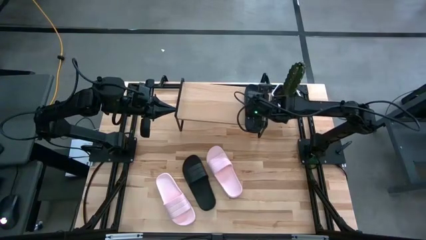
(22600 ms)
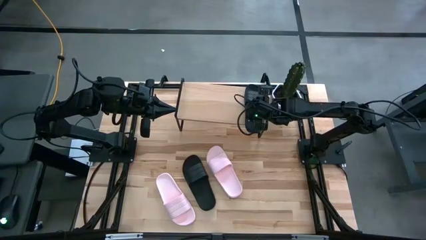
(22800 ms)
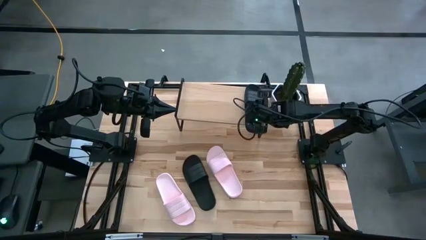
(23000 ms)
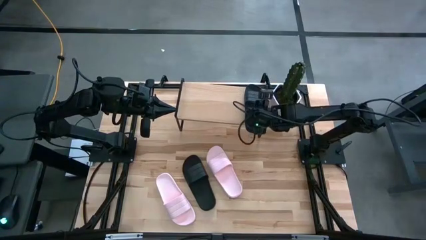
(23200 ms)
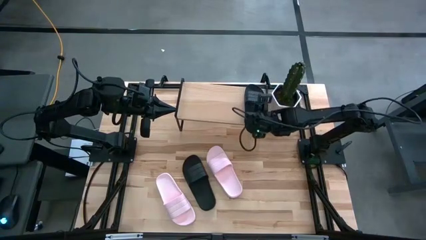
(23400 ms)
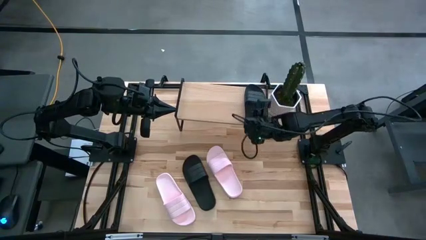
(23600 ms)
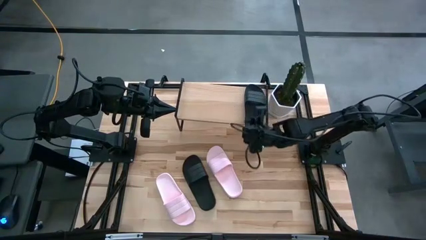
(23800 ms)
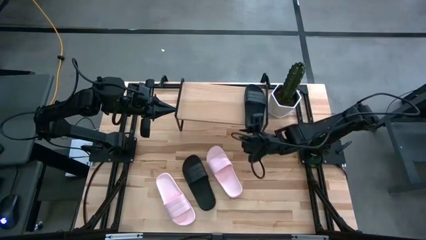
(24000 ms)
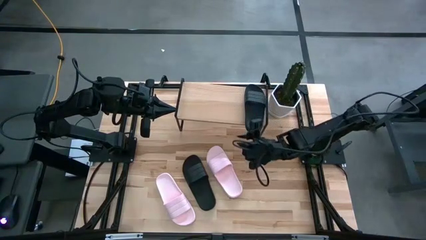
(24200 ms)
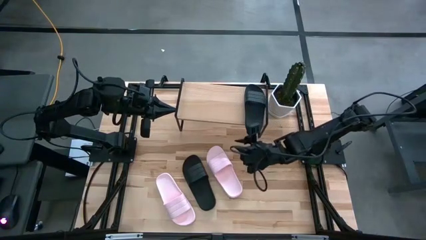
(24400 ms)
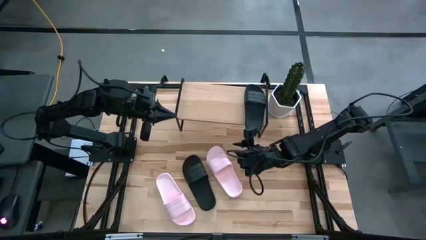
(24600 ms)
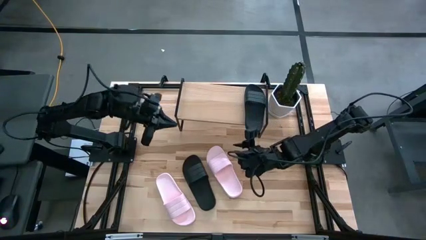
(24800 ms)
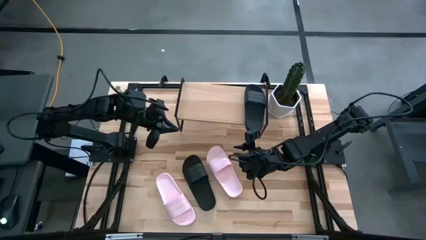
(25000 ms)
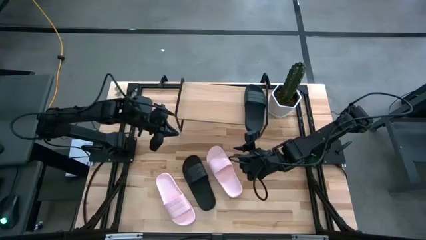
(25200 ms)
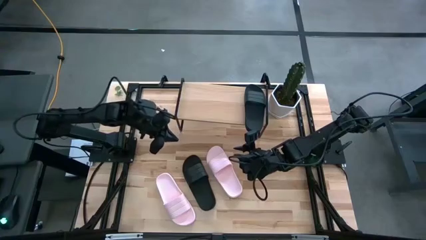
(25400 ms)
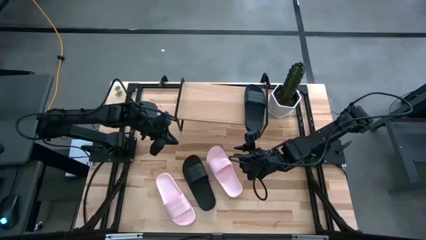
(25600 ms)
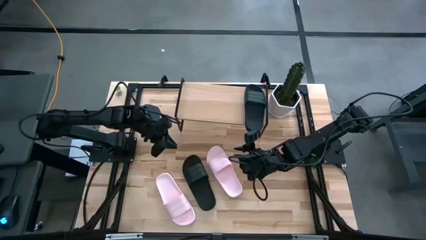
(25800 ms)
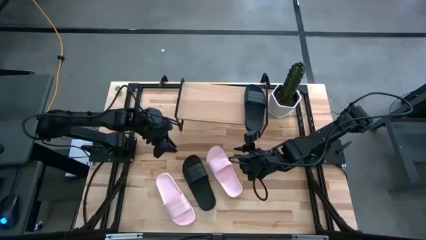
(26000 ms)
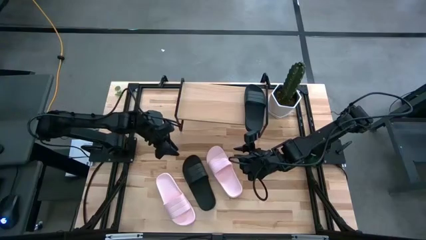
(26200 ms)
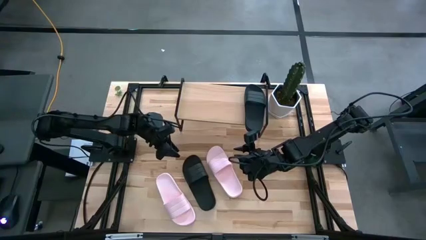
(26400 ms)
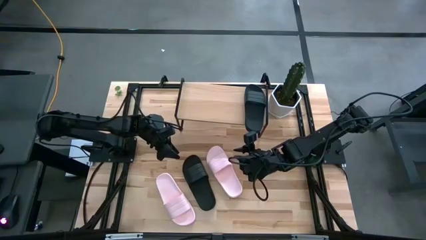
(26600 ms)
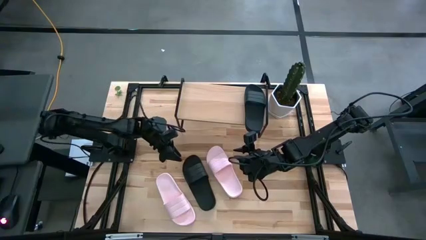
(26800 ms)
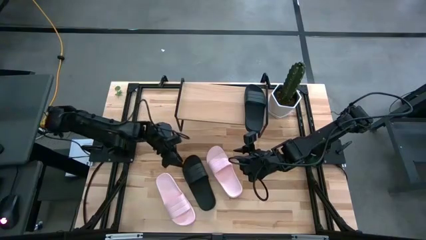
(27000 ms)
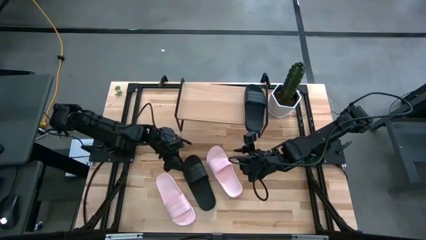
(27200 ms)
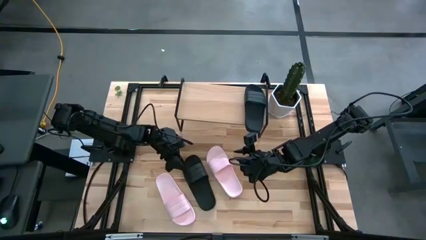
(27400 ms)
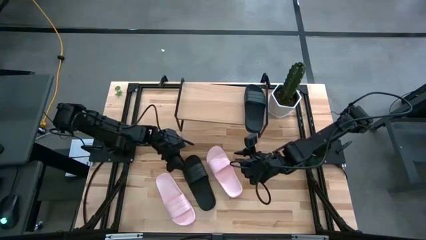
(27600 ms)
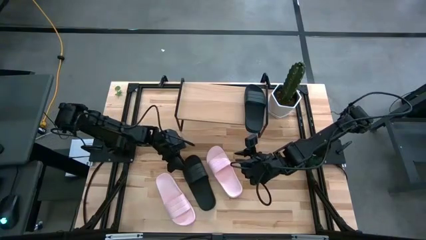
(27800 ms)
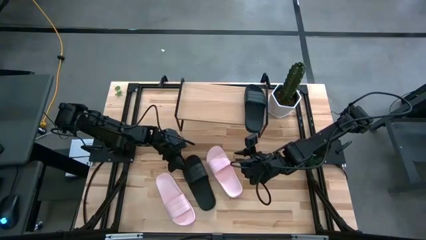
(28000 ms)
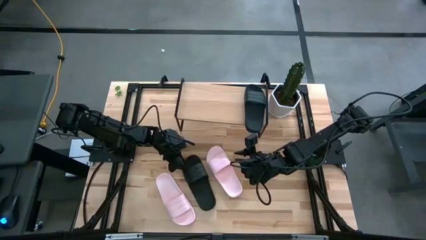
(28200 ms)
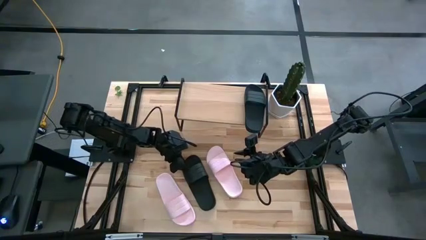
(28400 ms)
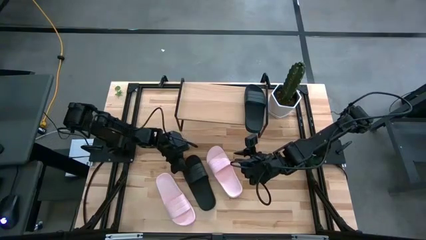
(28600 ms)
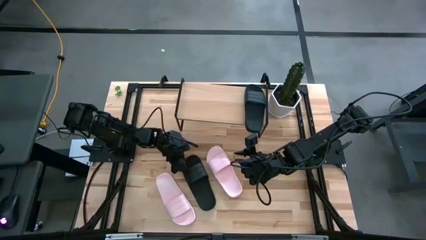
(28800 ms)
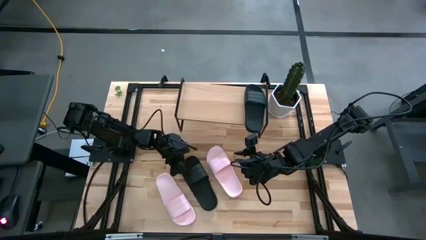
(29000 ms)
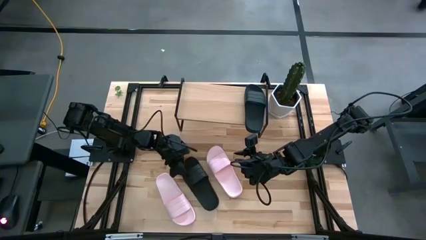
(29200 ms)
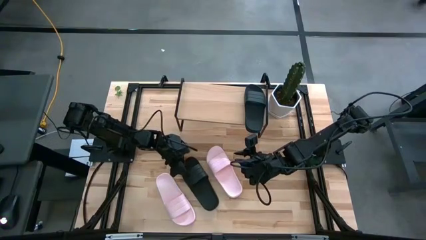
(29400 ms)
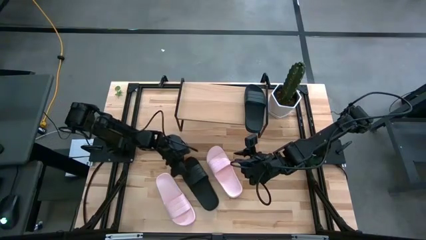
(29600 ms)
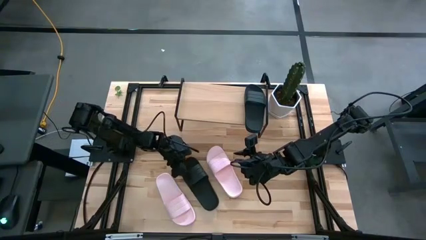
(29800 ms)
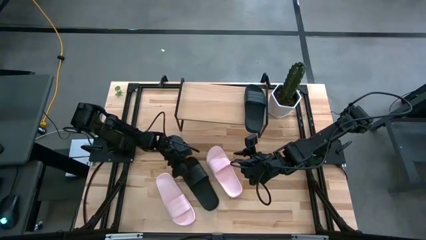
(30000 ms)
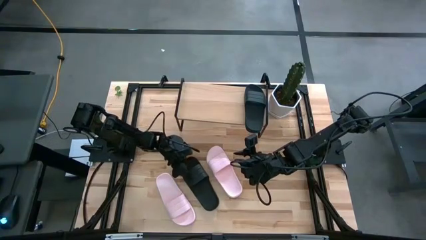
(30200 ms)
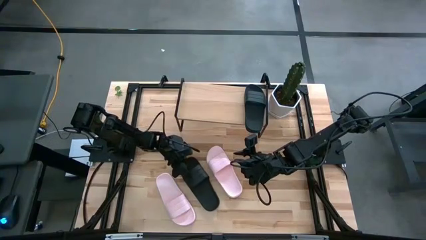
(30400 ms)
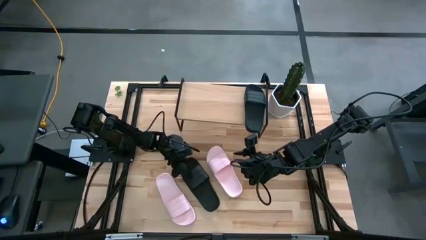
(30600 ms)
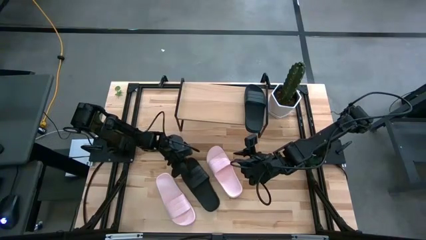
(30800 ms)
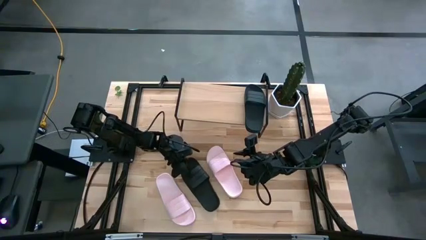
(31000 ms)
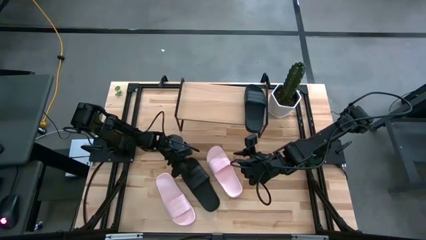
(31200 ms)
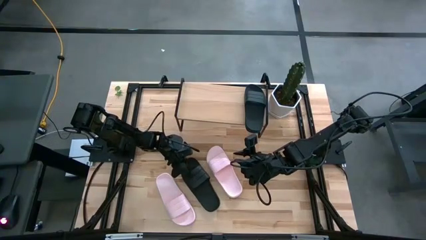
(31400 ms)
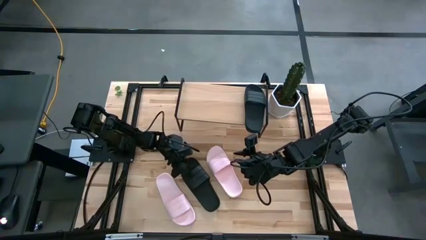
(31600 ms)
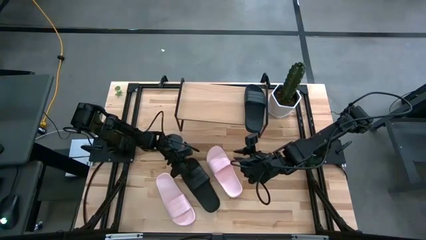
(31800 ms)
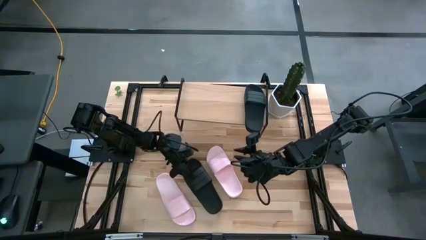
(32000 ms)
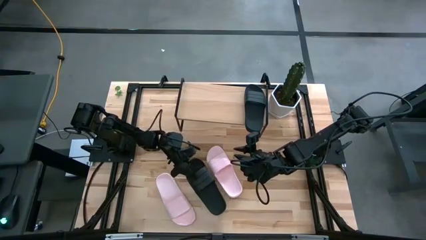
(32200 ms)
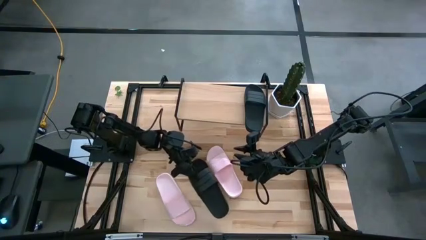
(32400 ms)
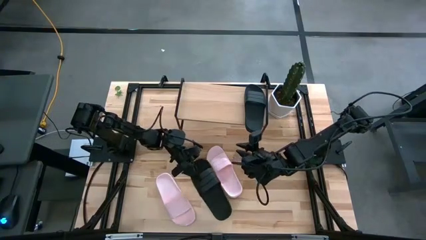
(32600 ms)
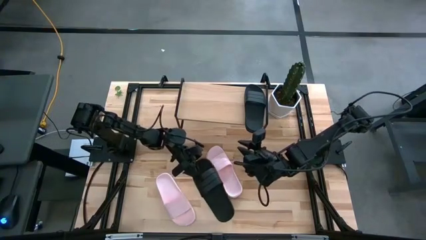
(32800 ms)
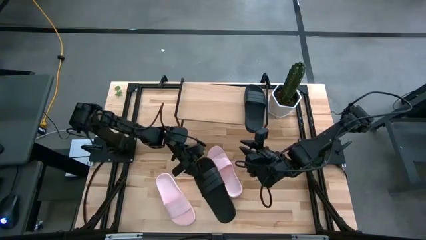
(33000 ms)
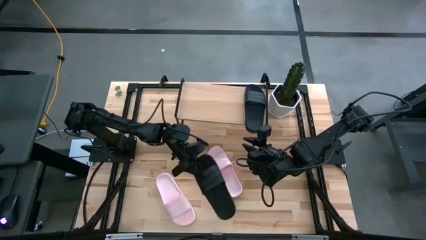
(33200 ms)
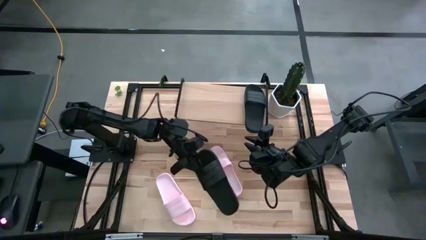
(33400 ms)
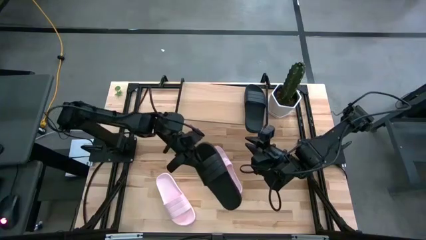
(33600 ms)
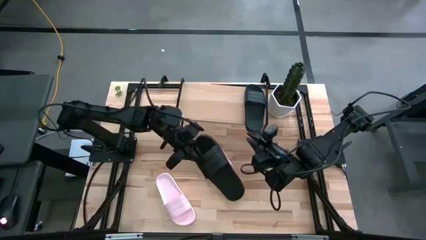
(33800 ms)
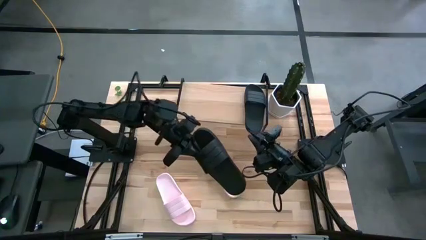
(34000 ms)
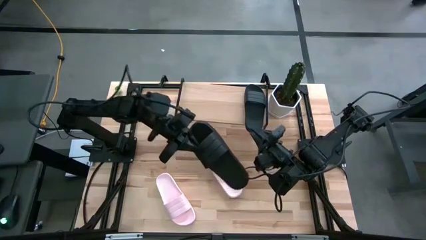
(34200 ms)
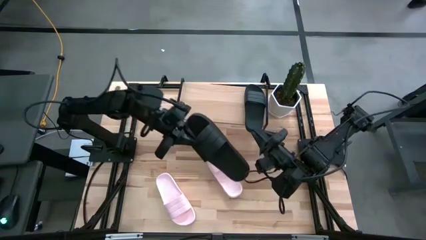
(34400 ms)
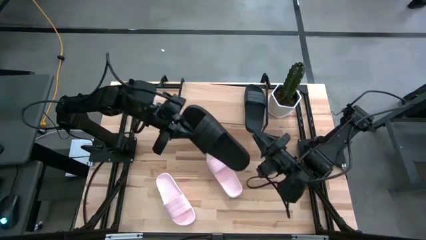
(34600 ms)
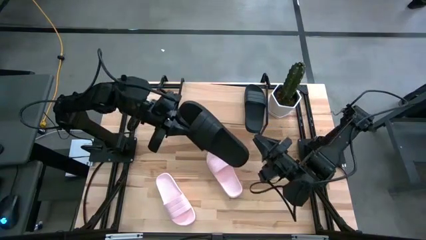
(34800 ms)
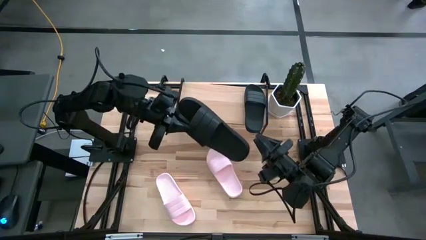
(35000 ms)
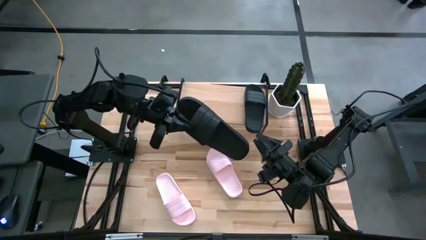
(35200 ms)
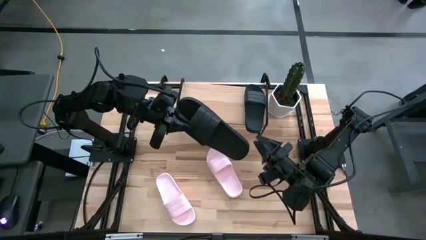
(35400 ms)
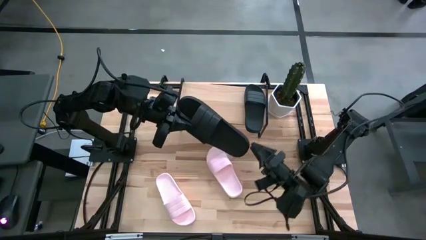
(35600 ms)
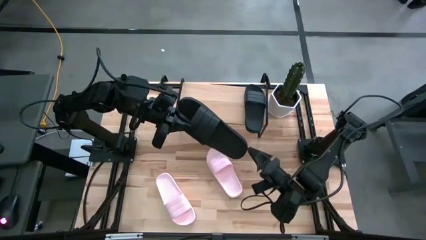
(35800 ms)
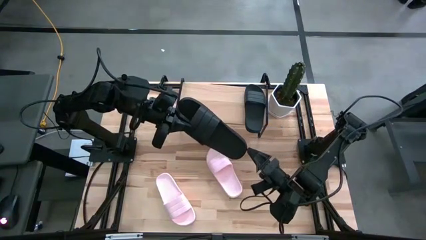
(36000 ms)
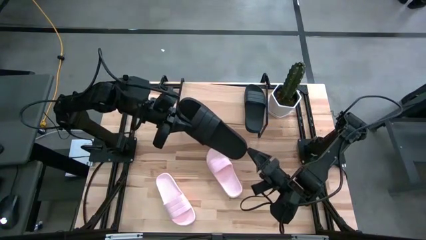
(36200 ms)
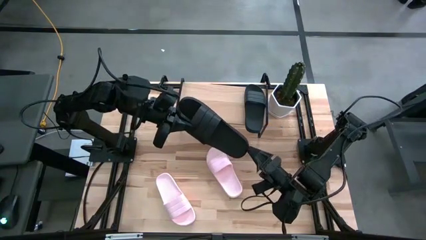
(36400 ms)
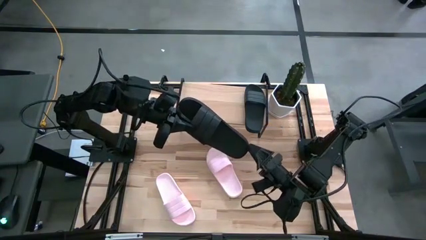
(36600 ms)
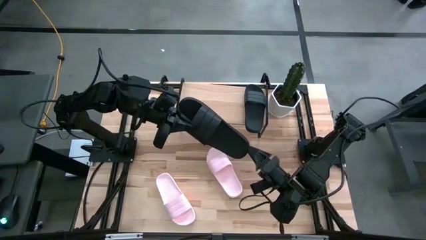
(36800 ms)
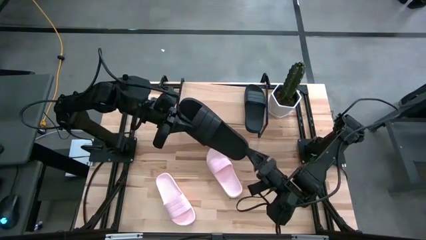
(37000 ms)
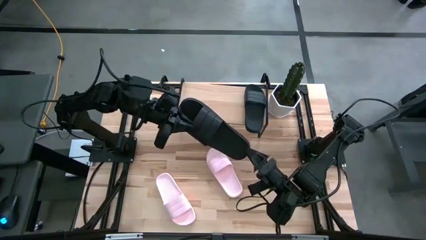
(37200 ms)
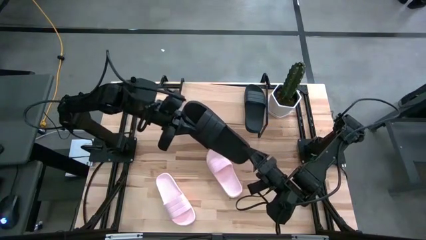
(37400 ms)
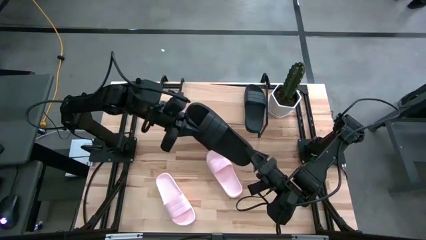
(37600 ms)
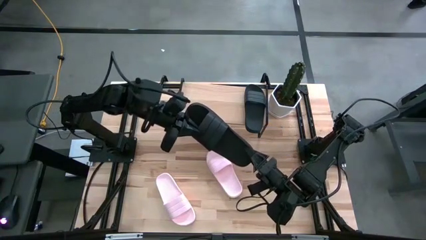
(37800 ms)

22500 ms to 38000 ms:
Task: Pick and place slides into the shelf
Put the black slide on the shelf

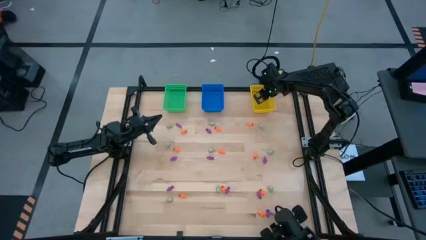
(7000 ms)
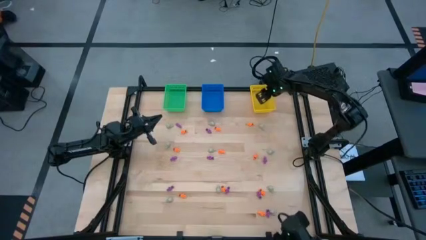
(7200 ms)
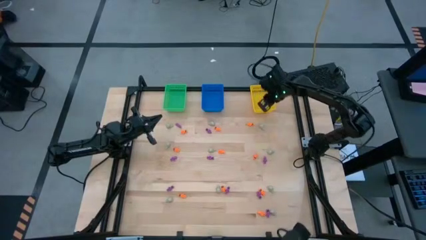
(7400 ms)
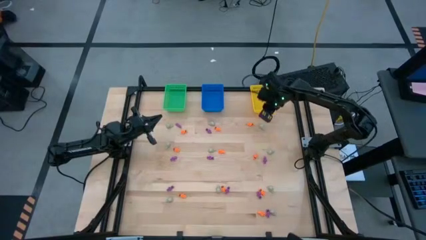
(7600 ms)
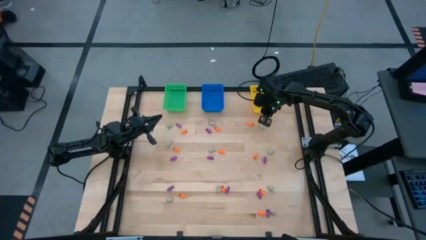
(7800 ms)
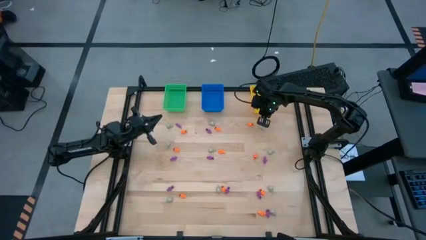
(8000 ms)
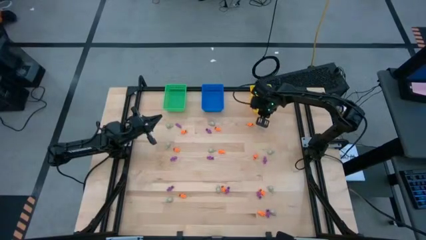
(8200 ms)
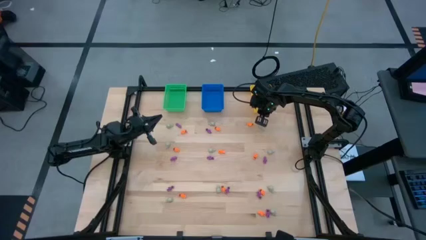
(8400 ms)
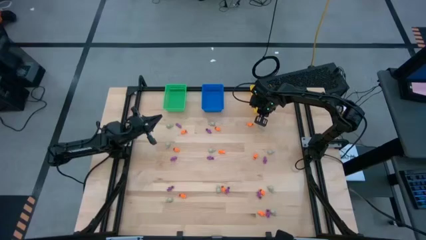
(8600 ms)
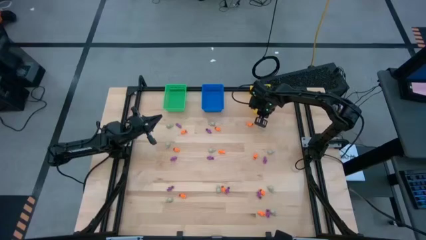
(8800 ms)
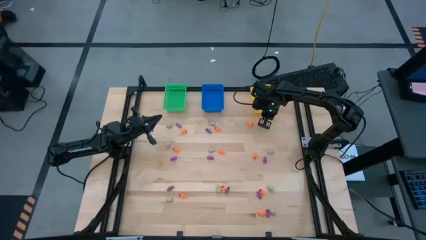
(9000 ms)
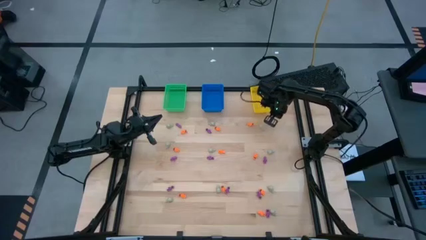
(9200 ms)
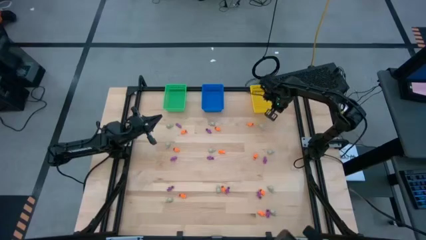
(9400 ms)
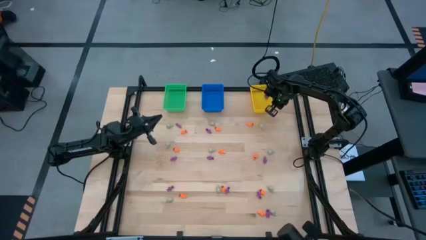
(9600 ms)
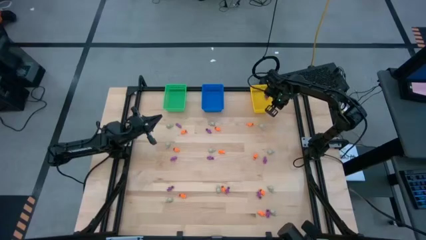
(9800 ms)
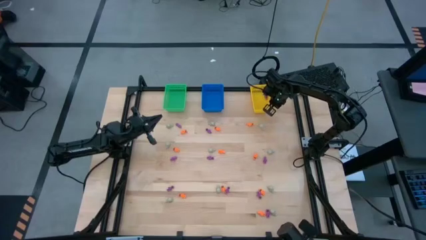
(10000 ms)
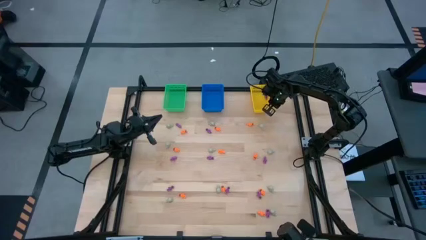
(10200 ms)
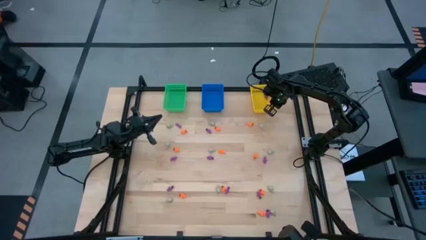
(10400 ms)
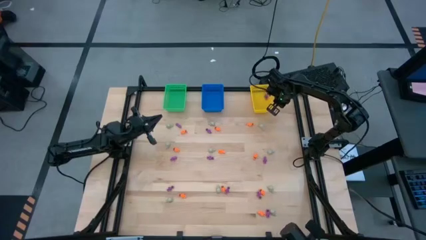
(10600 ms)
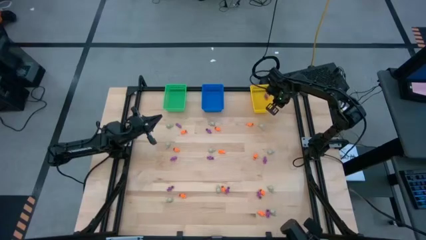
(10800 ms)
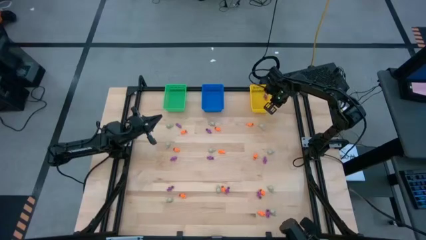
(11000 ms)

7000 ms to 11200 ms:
Task: Sort Halloween decoration
Adjust the yellow bin on the table
